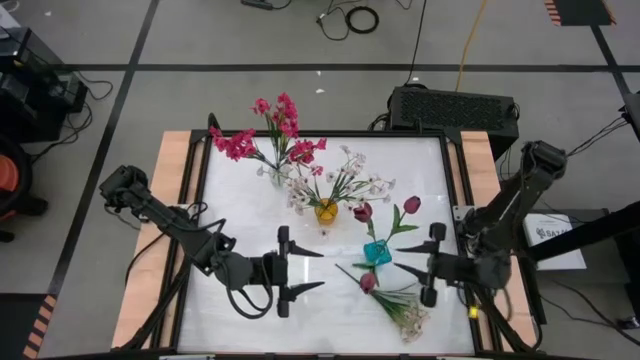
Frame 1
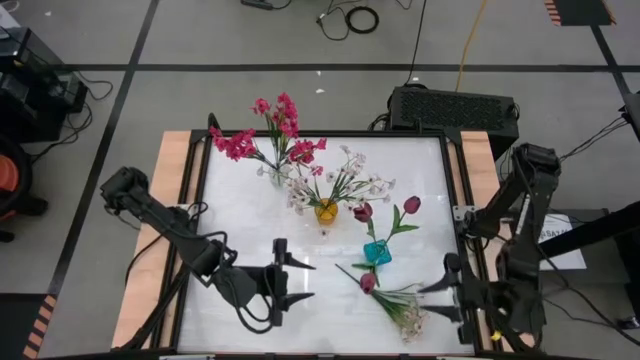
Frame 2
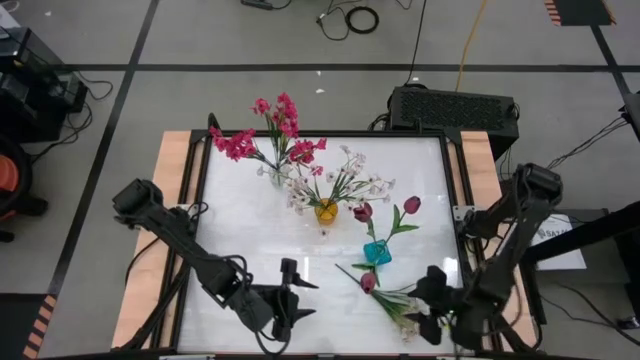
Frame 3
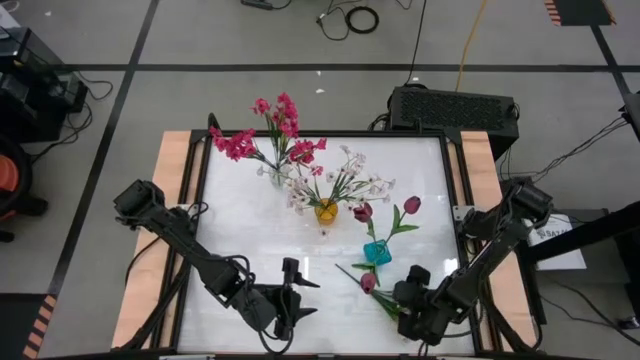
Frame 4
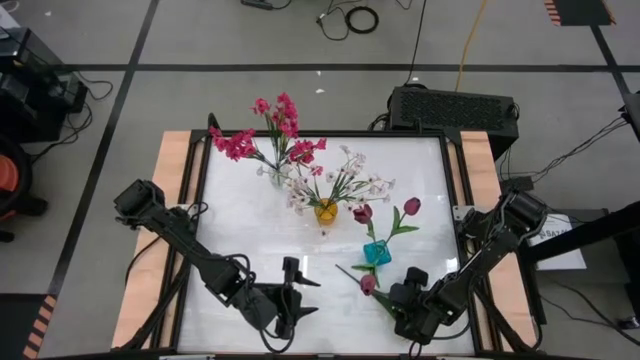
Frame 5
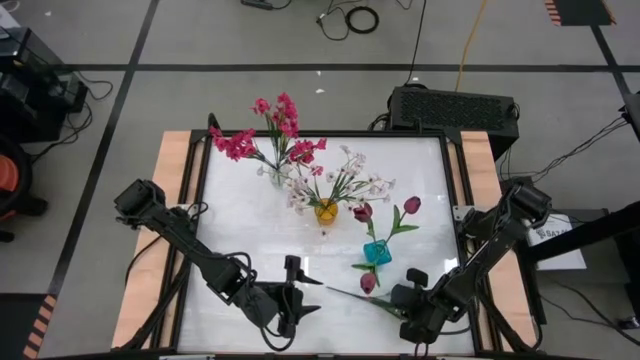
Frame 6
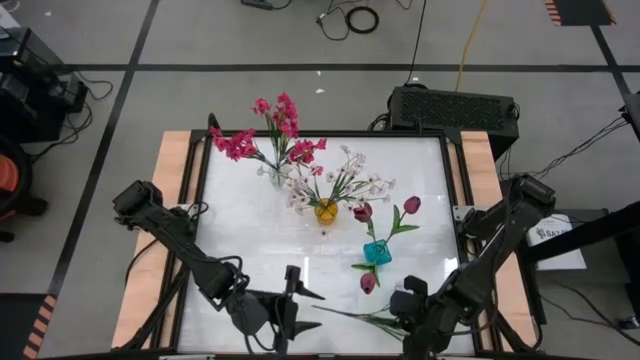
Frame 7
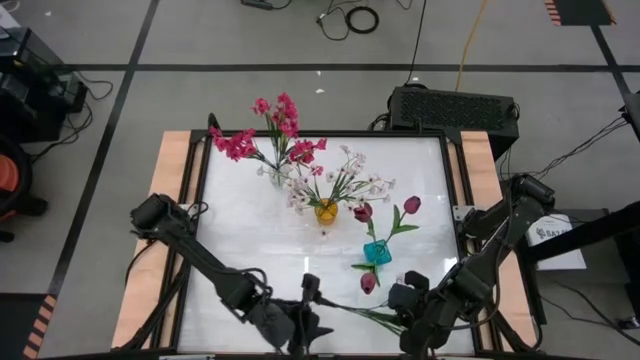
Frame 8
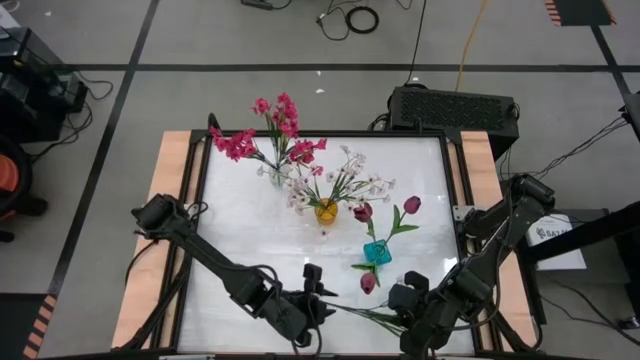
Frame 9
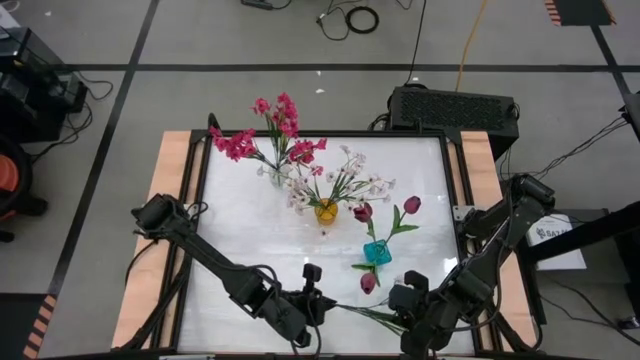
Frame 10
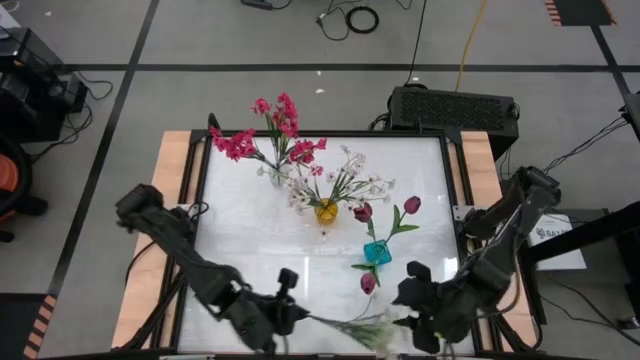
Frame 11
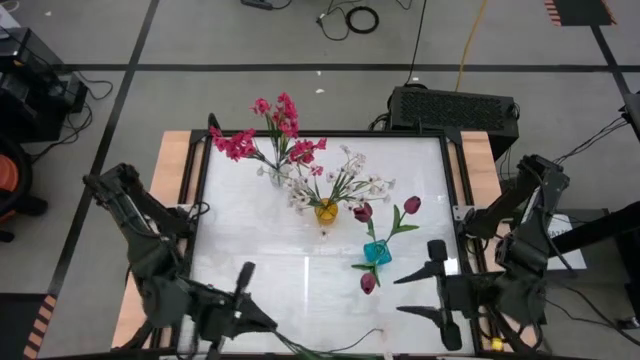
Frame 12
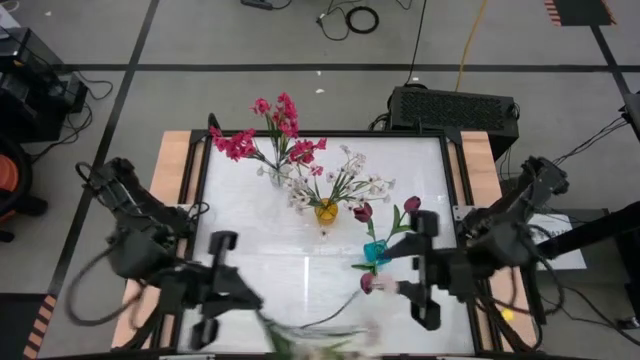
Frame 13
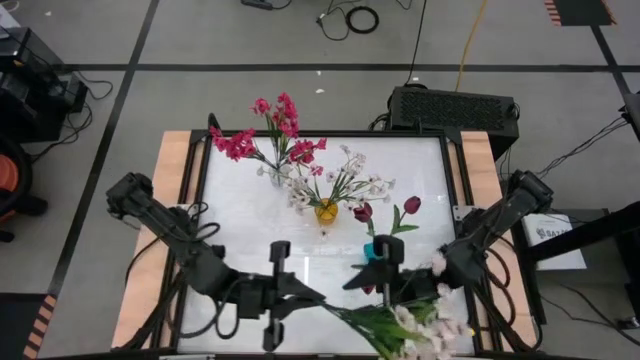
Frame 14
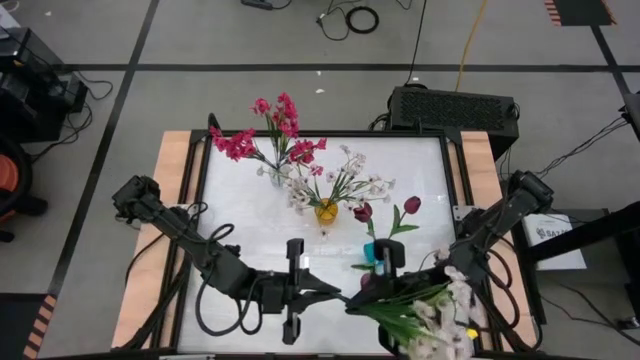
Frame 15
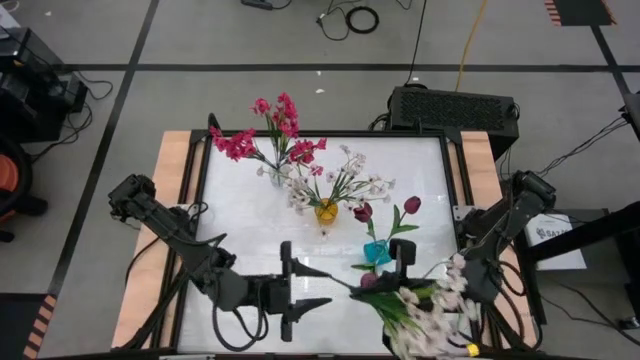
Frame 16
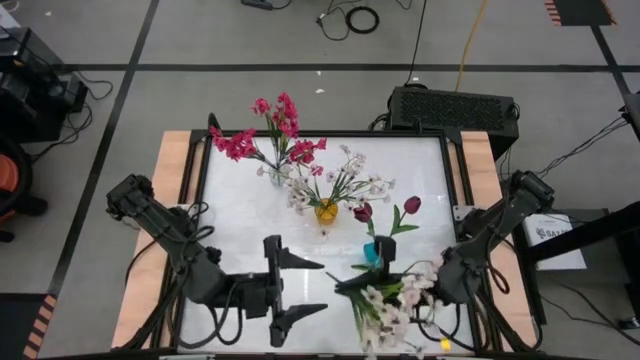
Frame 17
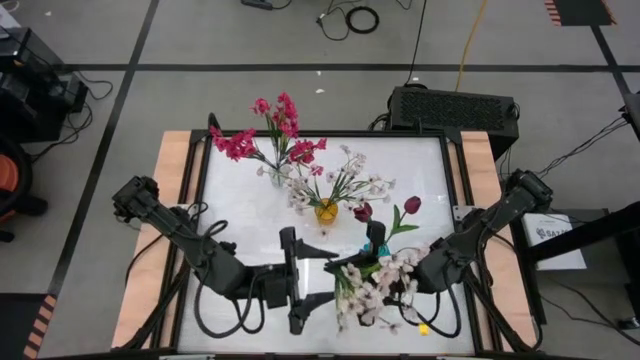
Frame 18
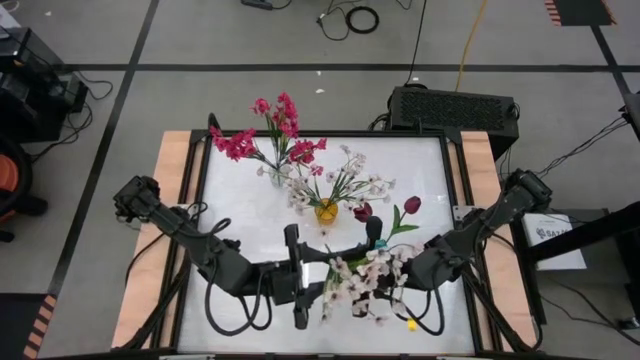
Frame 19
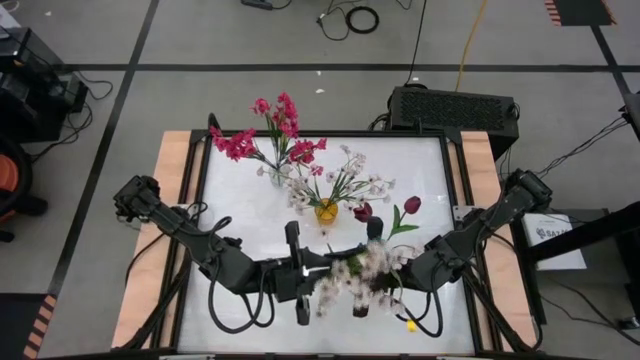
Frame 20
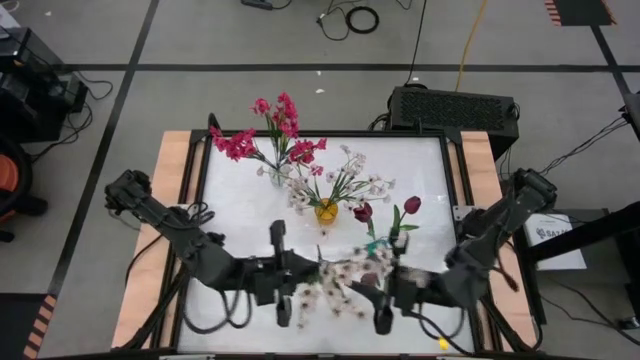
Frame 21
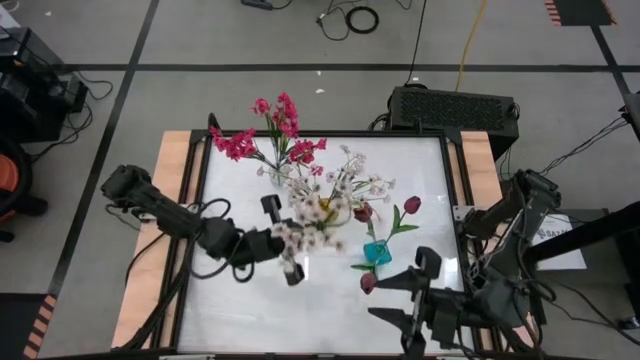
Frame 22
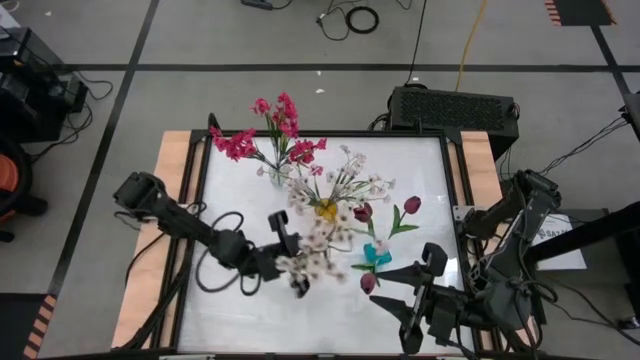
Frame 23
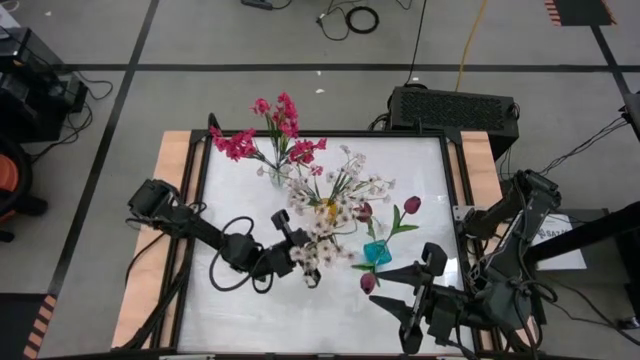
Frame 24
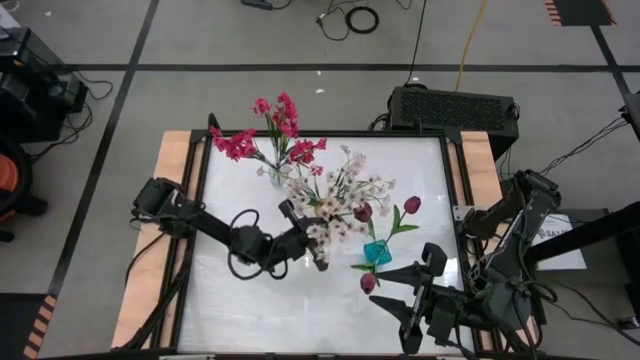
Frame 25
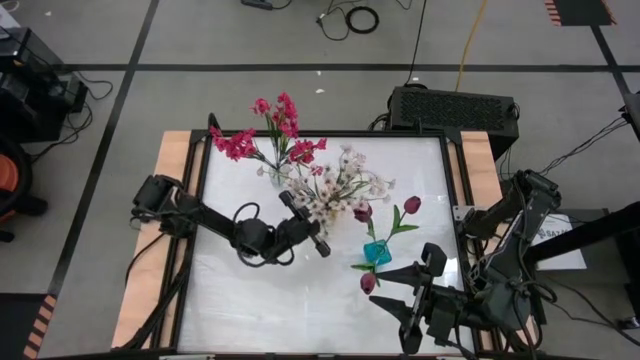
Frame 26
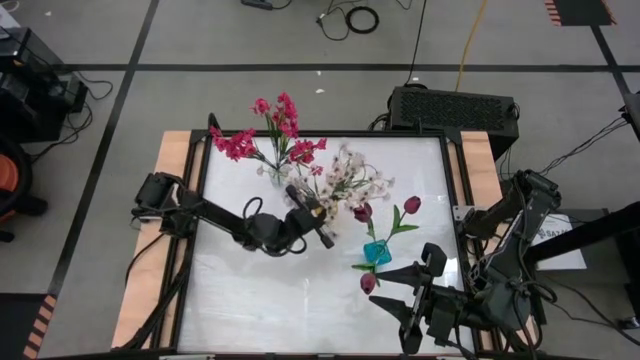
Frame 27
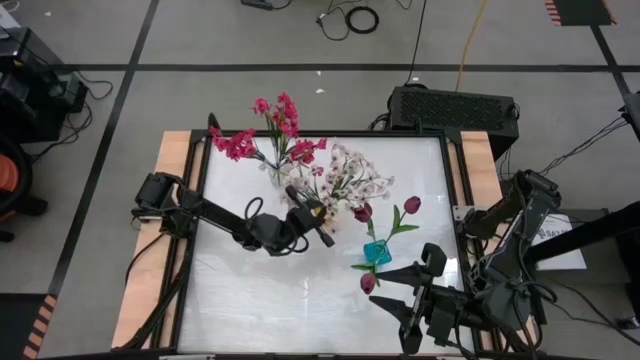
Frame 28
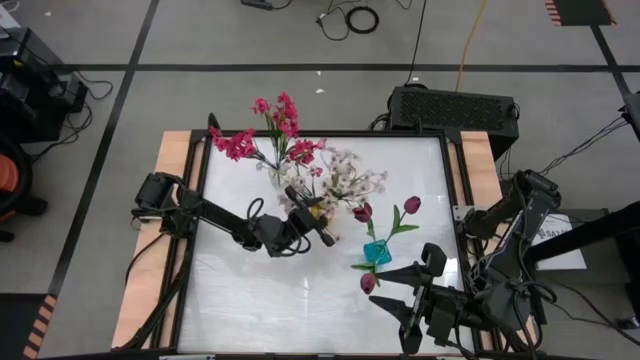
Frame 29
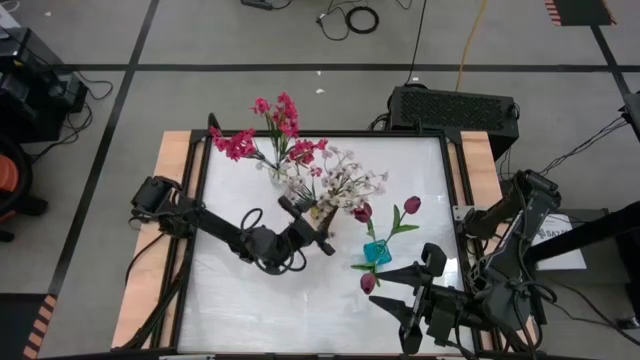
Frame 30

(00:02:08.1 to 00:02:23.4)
Task: Sort flowers into vase by color
Put the white flowers into the yellow vase

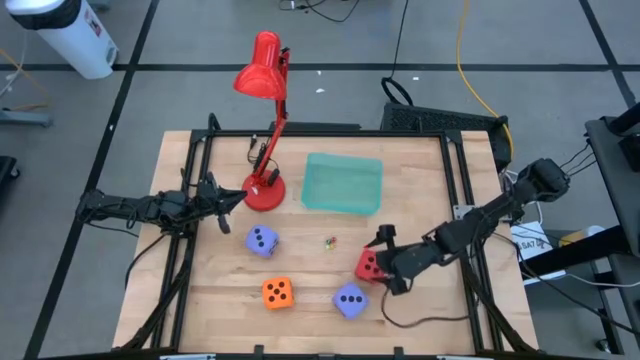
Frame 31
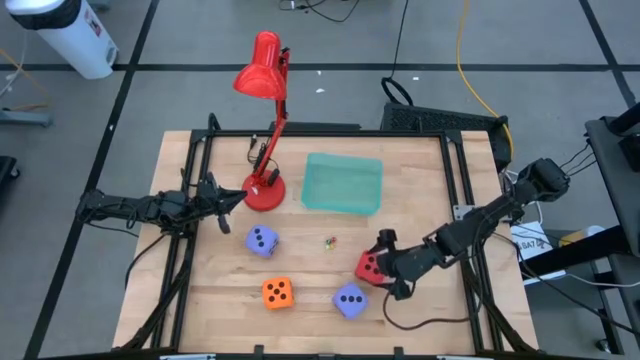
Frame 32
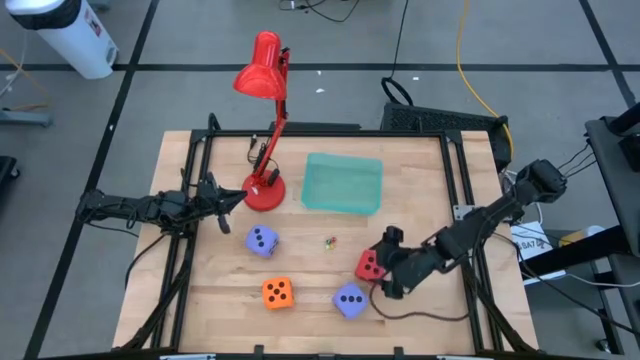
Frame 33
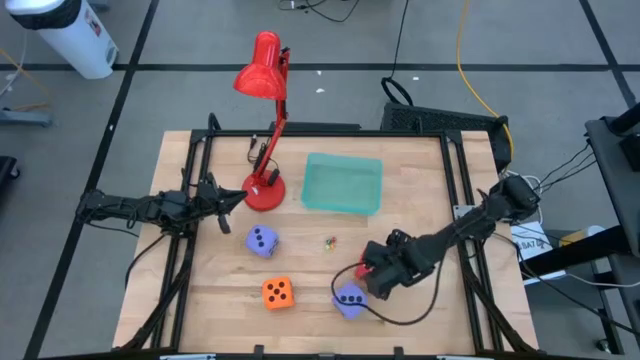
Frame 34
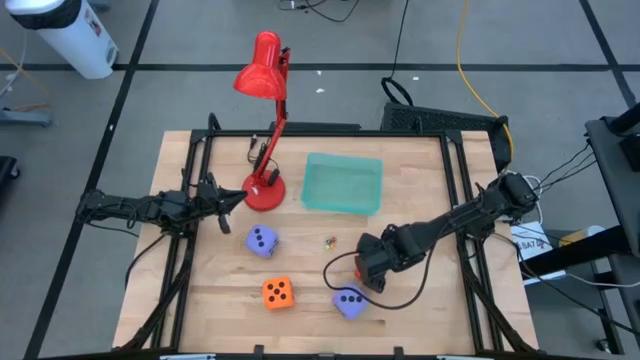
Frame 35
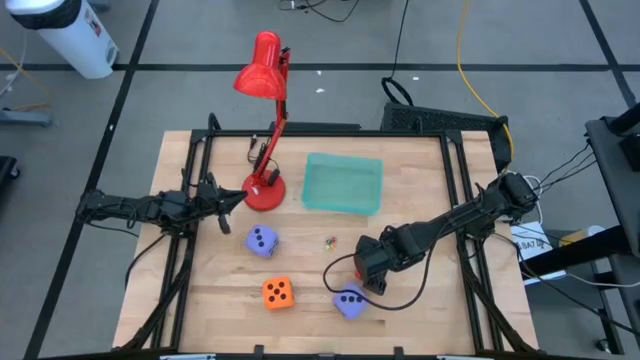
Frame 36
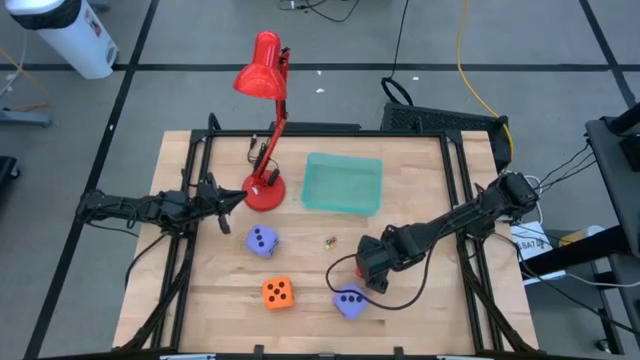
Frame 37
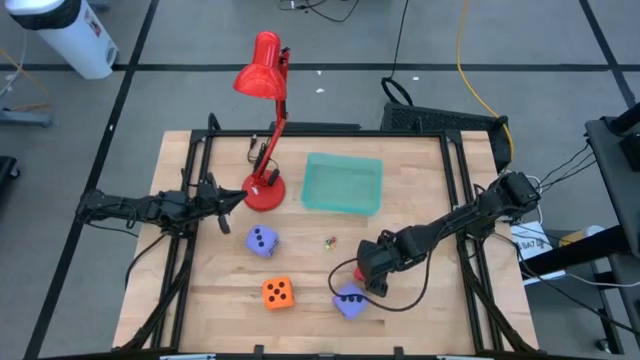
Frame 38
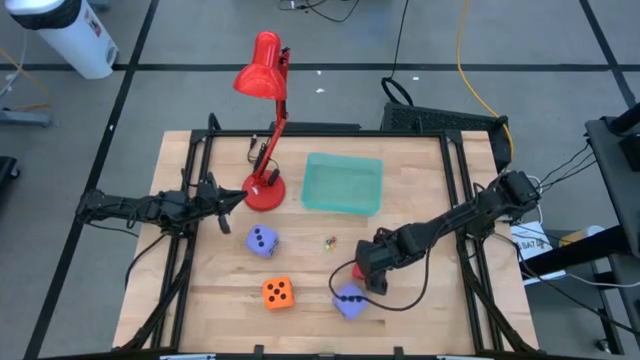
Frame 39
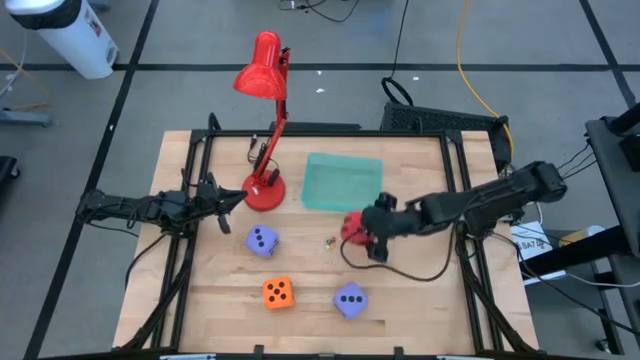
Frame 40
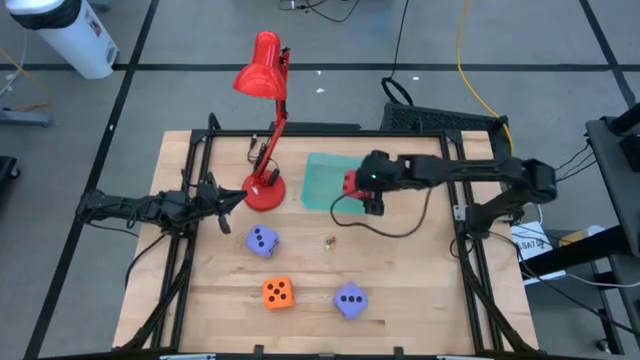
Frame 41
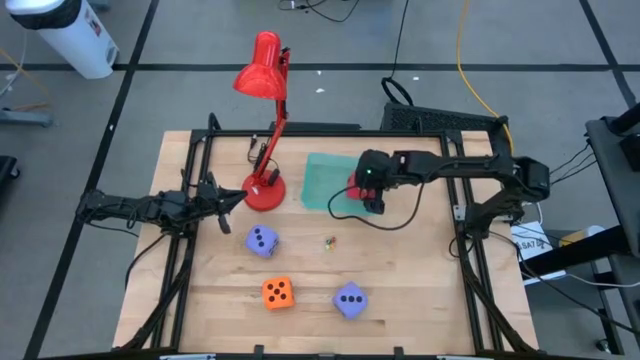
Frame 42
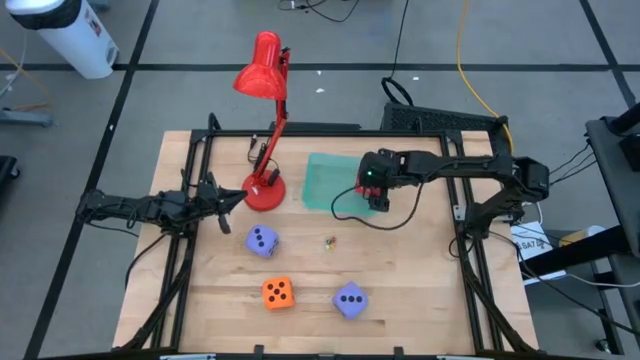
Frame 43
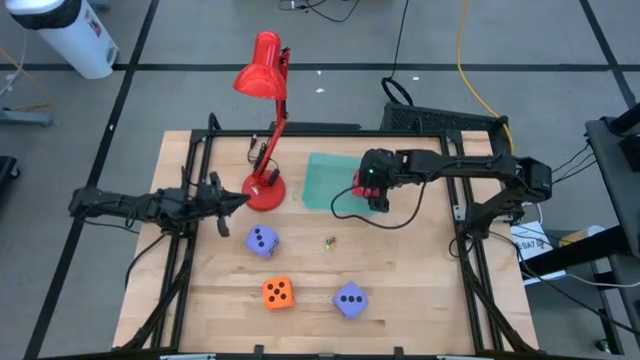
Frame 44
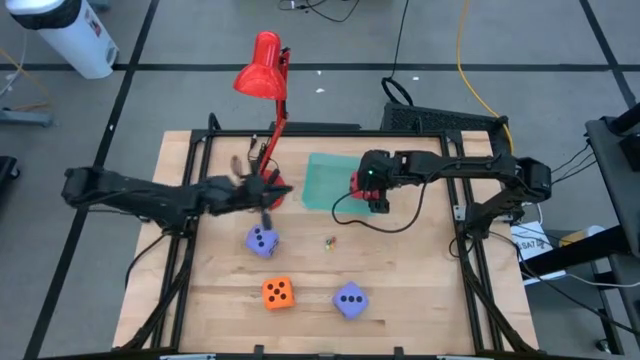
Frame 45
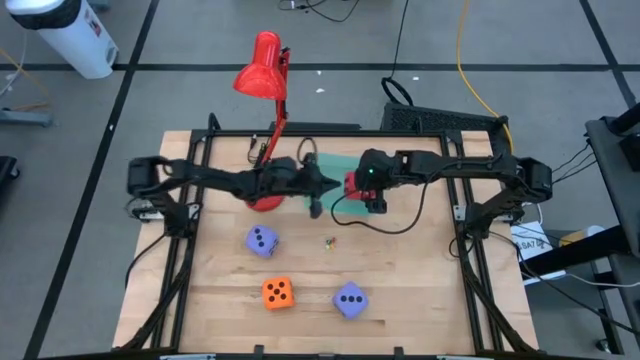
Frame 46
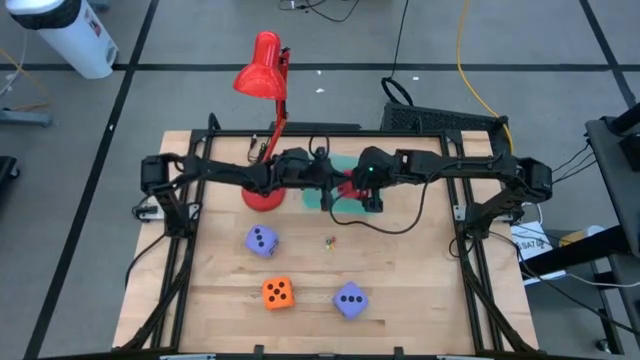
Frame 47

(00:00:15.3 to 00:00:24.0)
Task: Pick & Place Dice
Put the large red die into the blue bin
